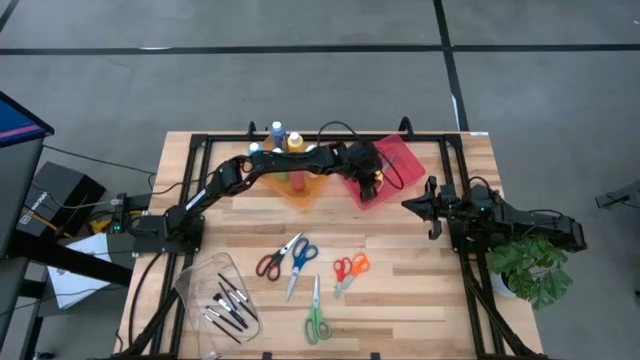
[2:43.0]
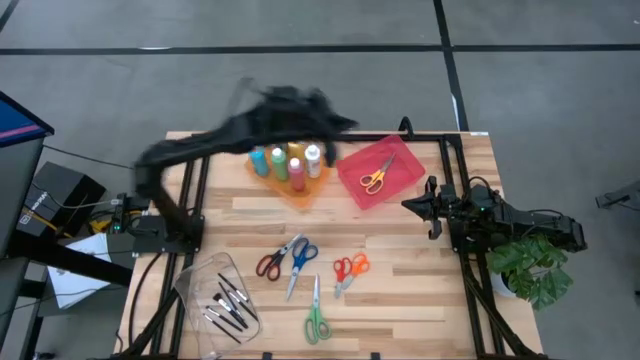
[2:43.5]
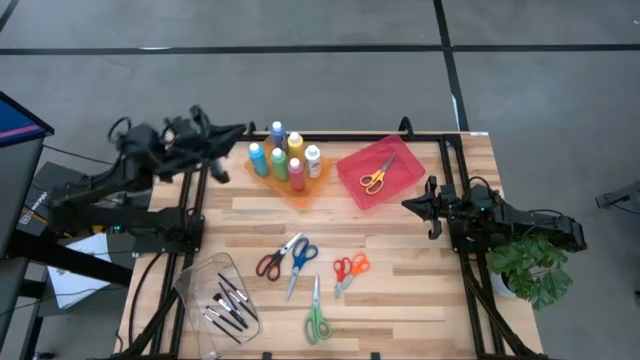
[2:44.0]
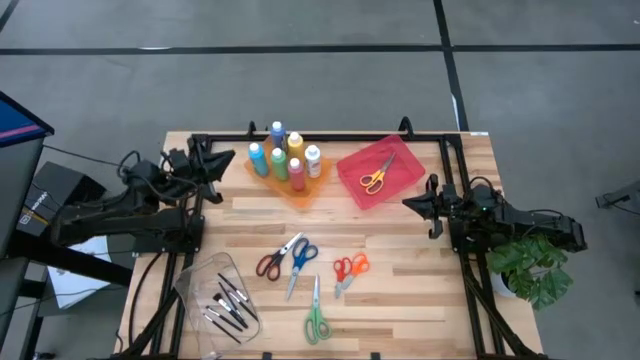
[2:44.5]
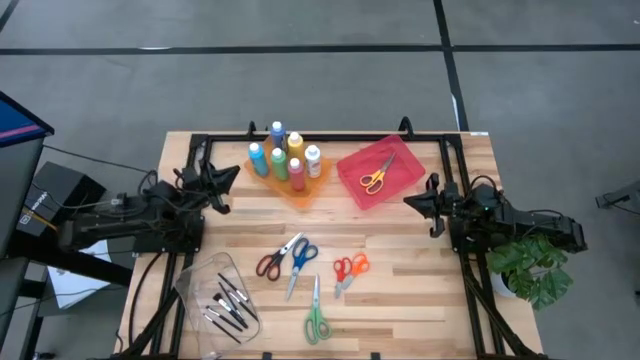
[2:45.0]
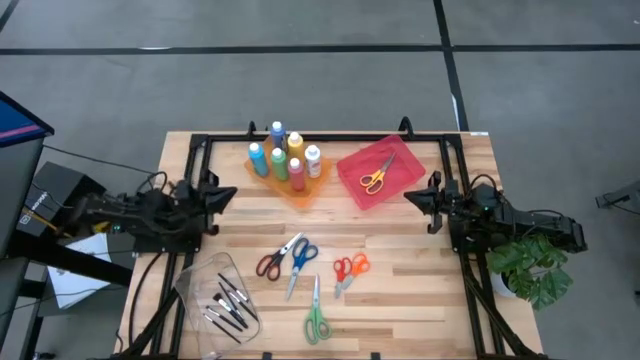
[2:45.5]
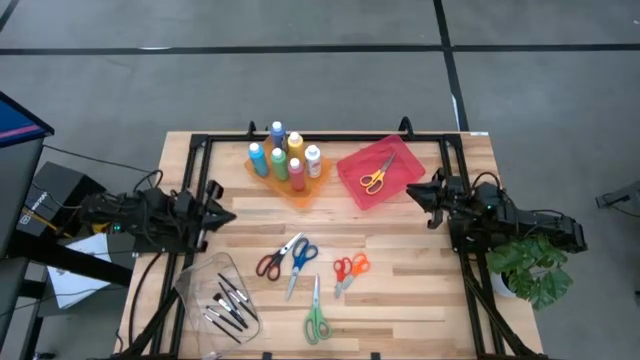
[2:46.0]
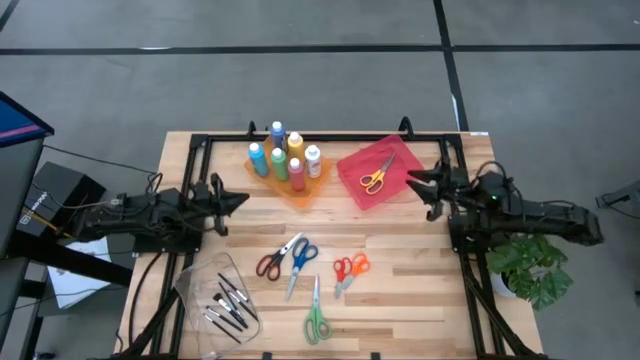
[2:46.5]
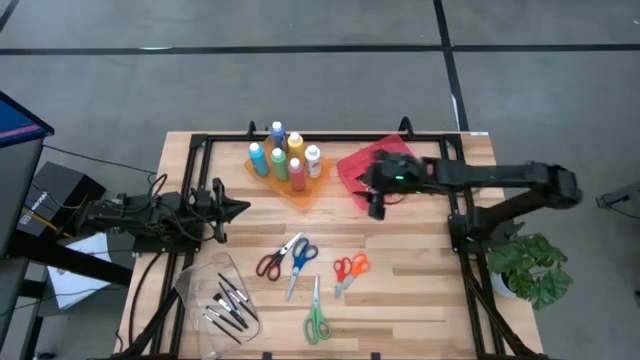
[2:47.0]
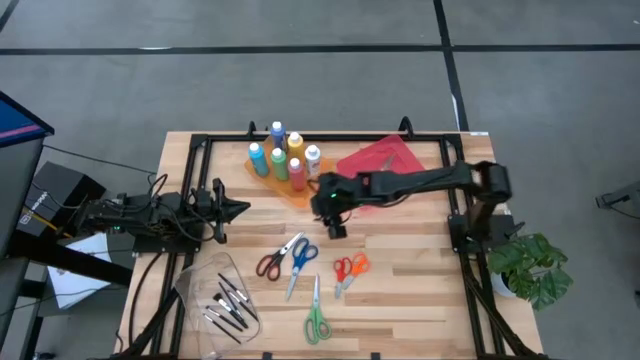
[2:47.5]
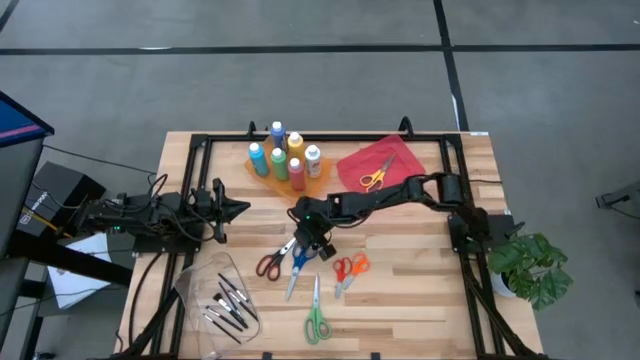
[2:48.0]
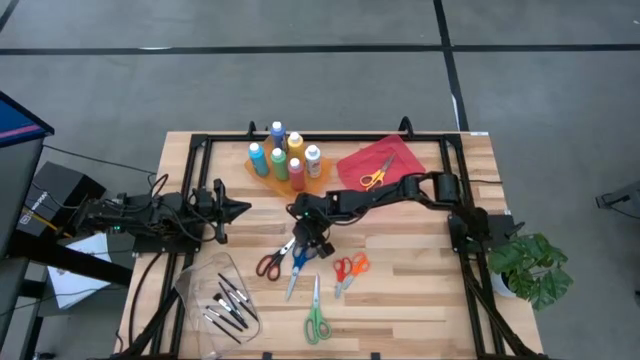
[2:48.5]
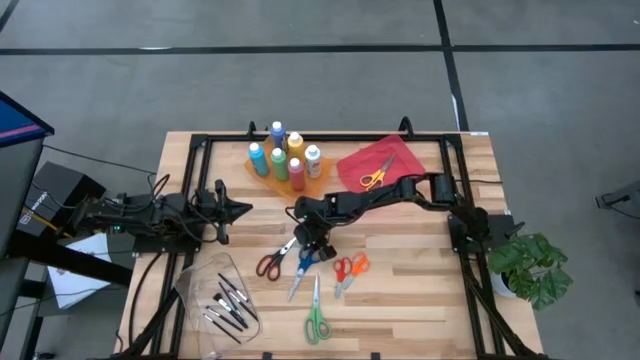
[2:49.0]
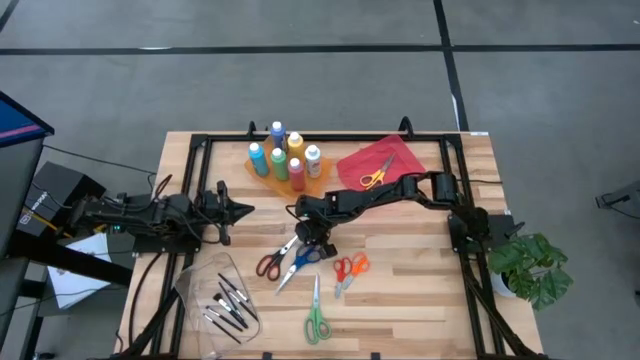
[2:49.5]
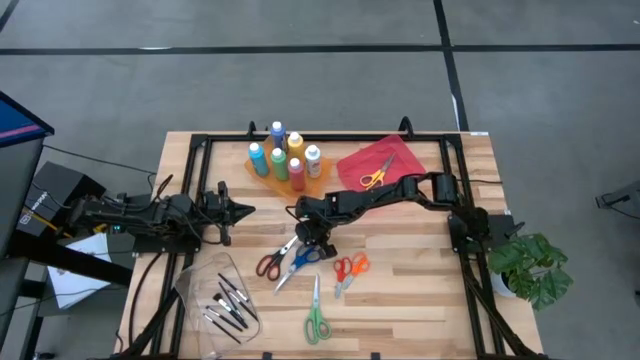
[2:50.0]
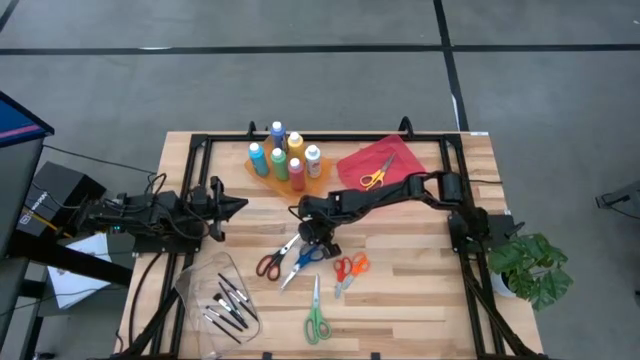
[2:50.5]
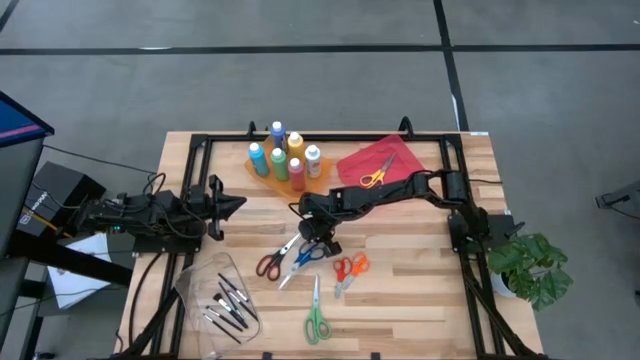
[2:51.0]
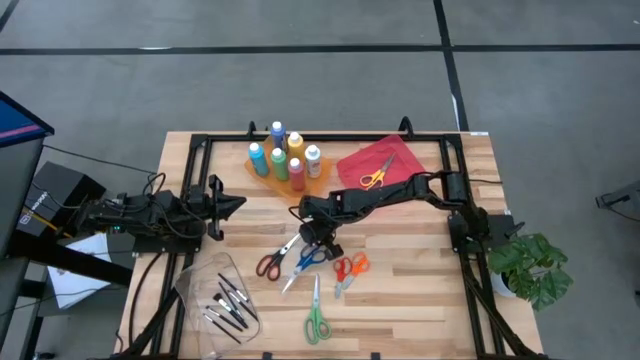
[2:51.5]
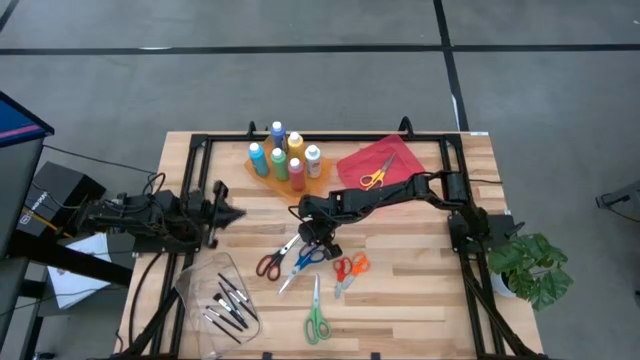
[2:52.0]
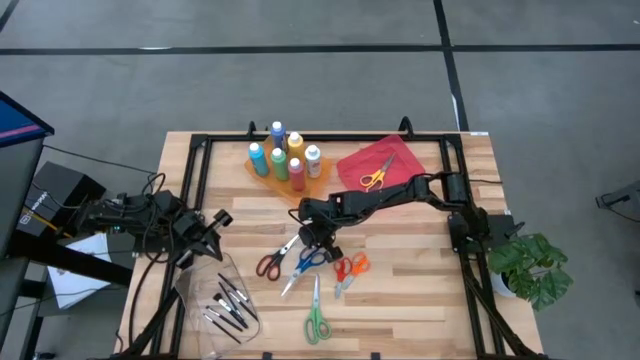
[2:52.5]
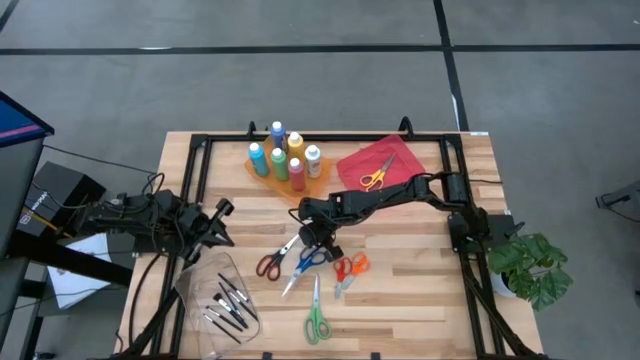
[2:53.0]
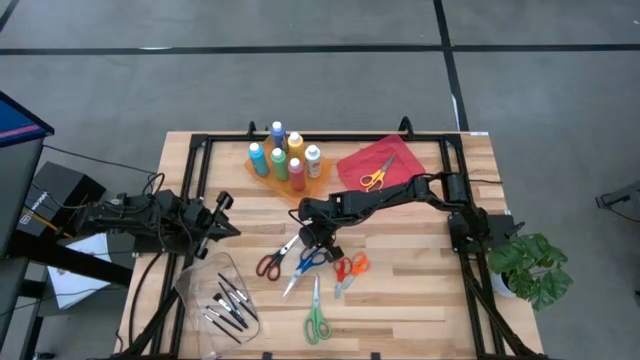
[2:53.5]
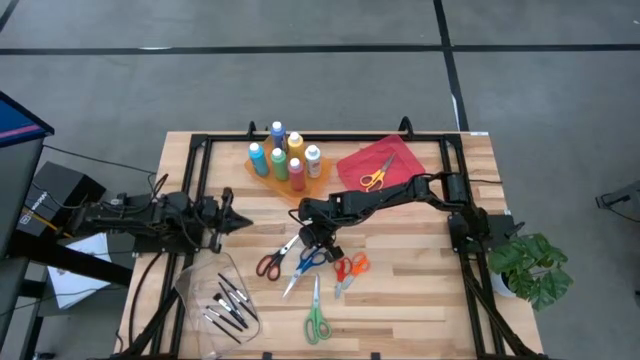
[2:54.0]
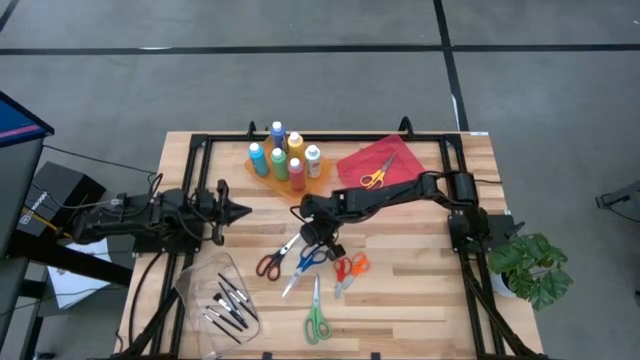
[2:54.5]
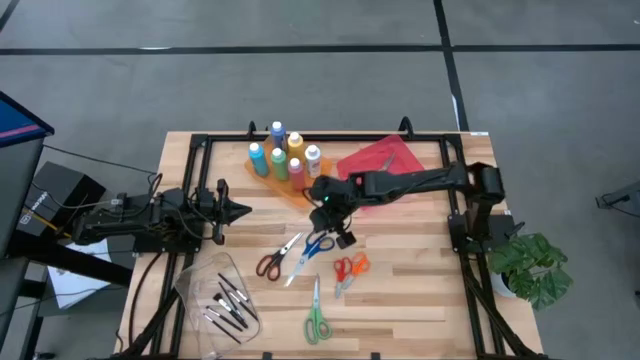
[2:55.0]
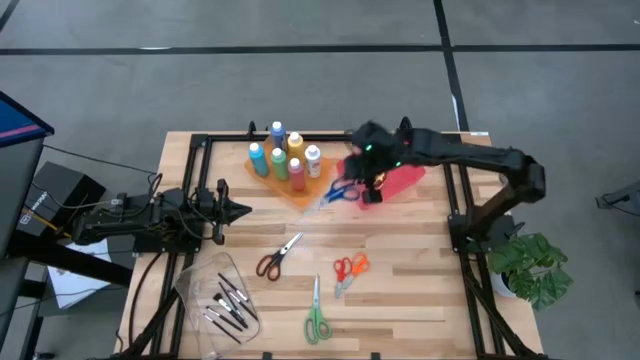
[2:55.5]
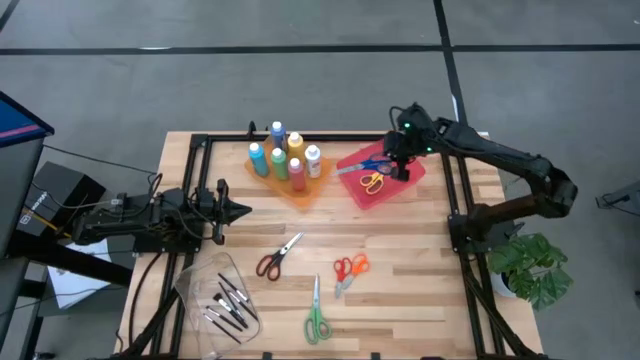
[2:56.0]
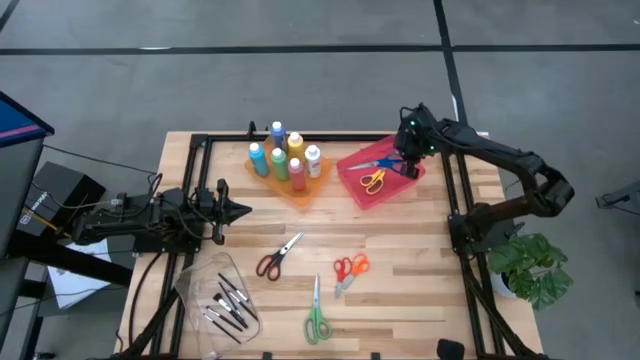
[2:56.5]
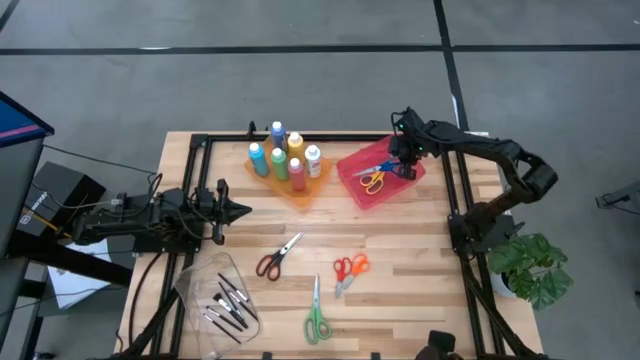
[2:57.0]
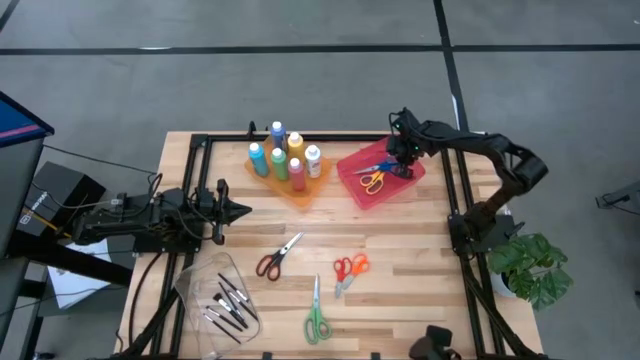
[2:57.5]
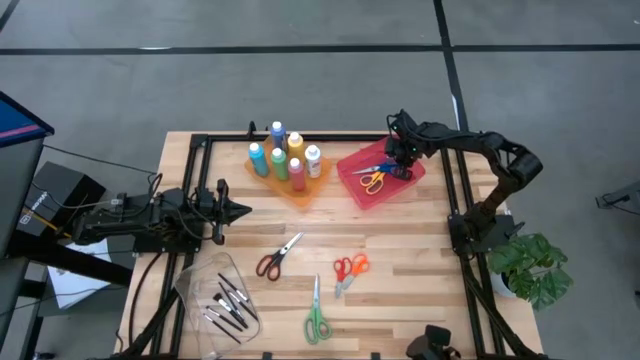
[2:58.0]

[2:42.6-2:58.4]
Task: Pick & Place Paint Supplies
Put the blue scissors into the pink bin

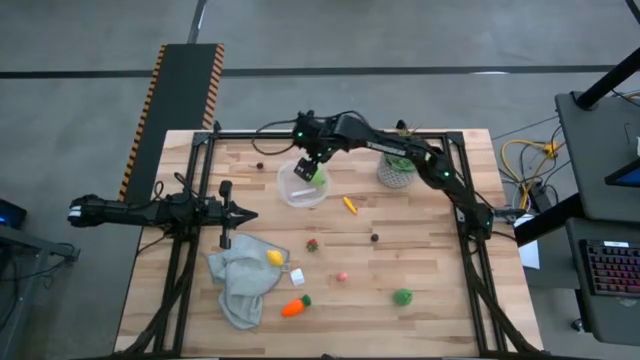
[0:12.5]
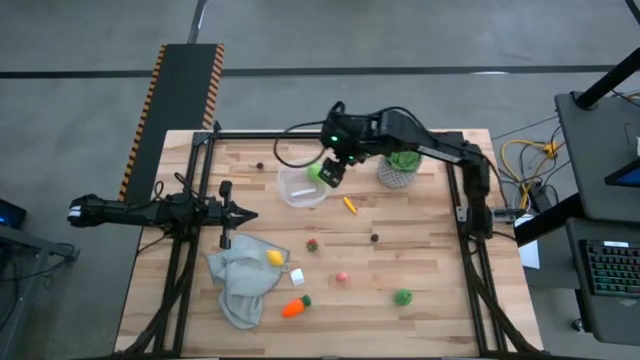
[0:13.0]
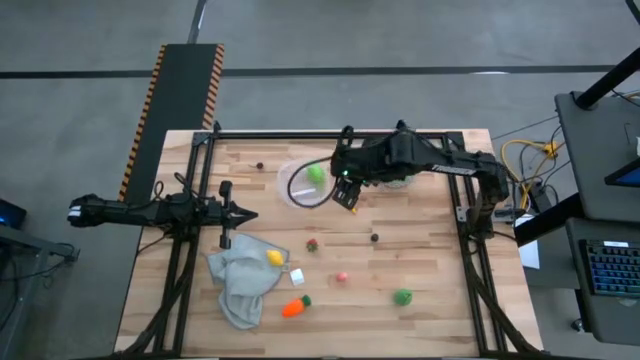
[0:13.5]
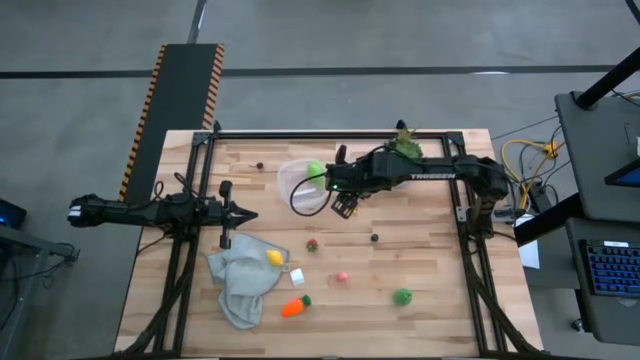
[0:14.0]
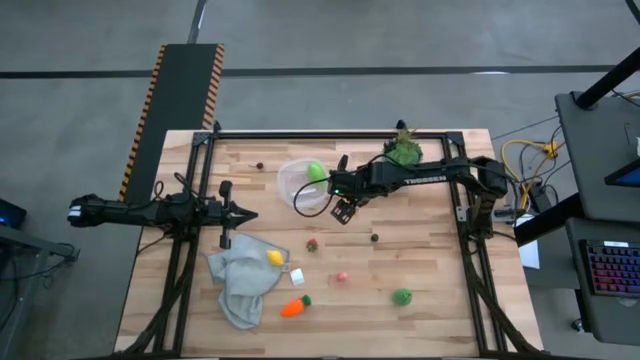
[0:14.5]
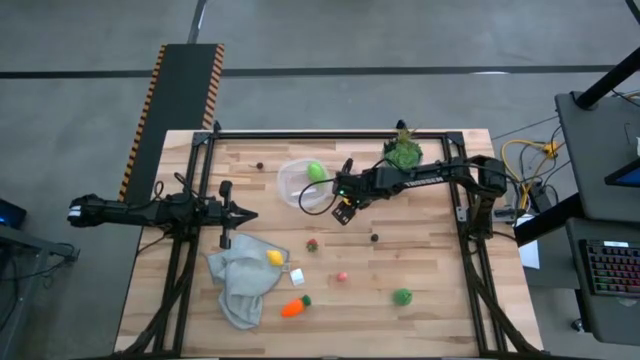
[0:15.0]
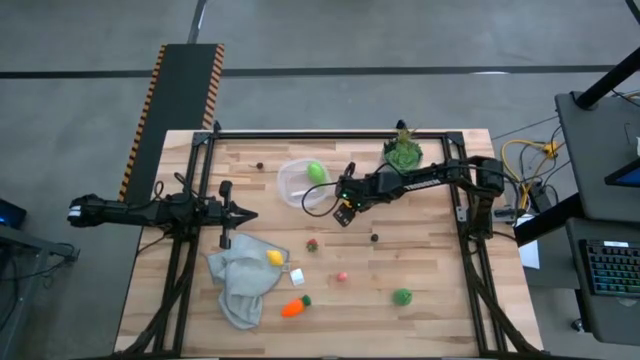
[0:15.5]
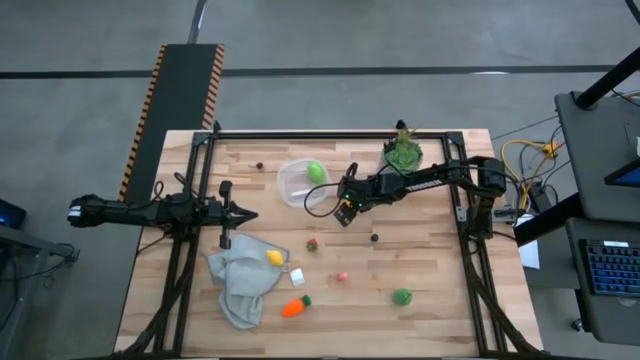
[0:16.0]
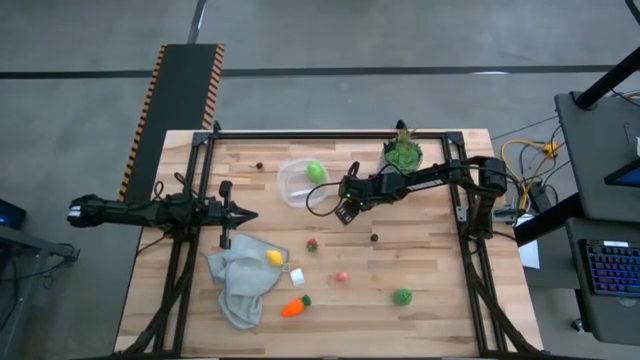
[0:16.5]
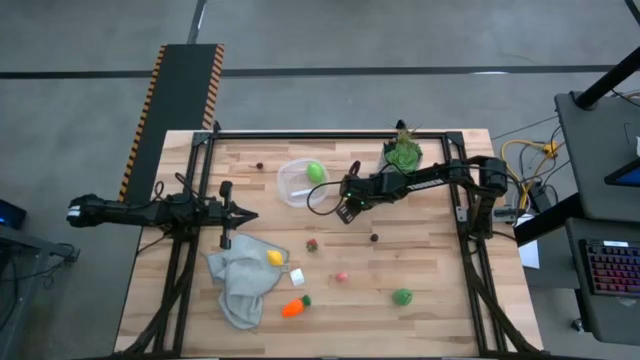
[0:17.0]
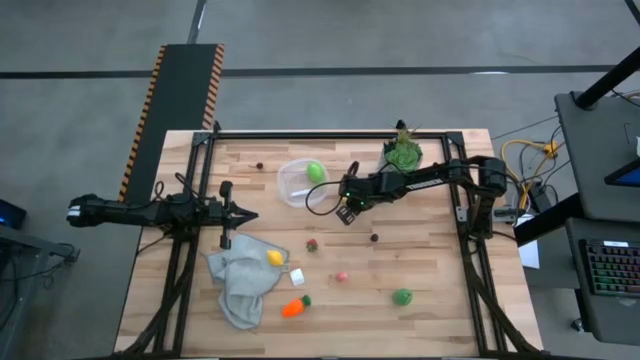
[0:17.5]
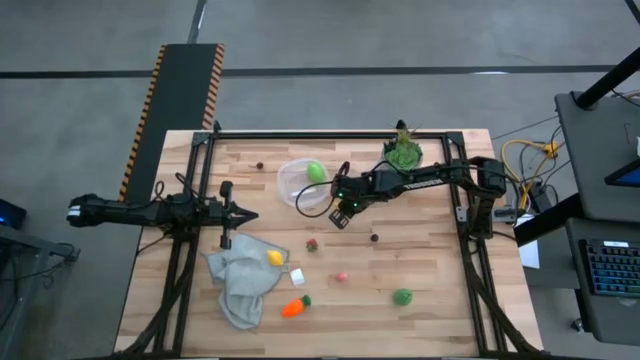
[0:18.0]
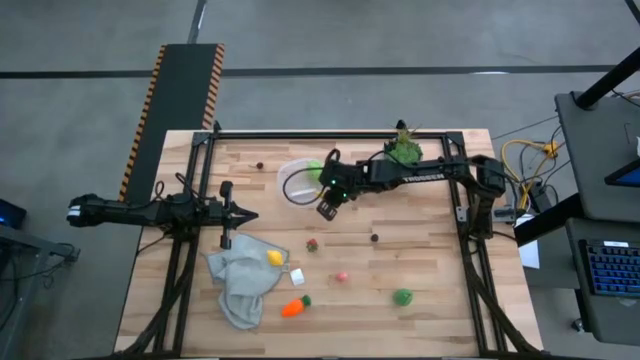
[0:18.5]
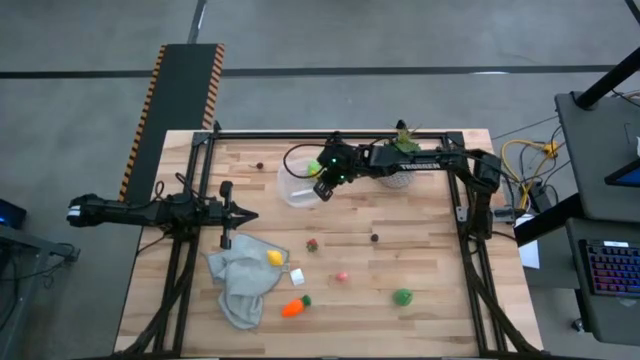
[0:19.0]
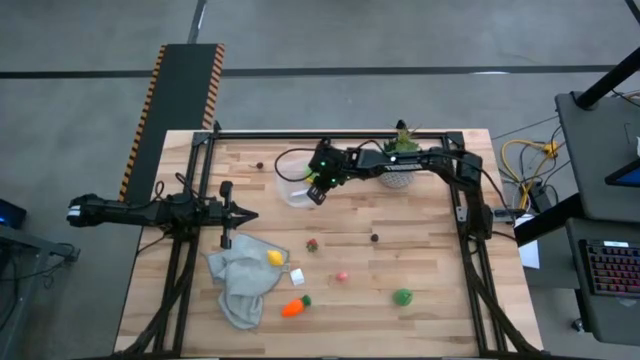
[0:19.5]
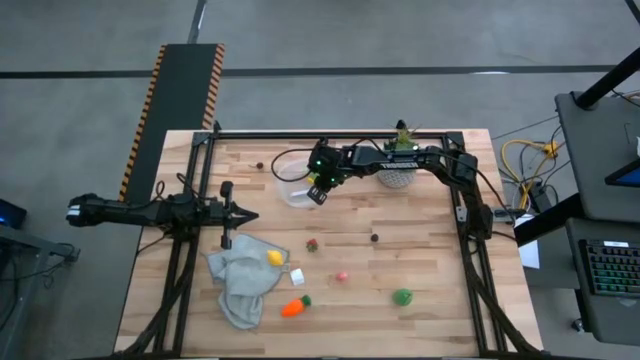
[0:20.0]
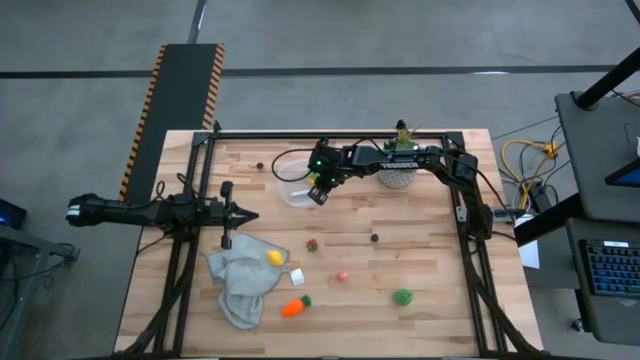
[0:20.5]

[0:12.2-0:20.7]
Task: Pick and placing Produce into tupperware
Put the yellow corn into the transparent bin
